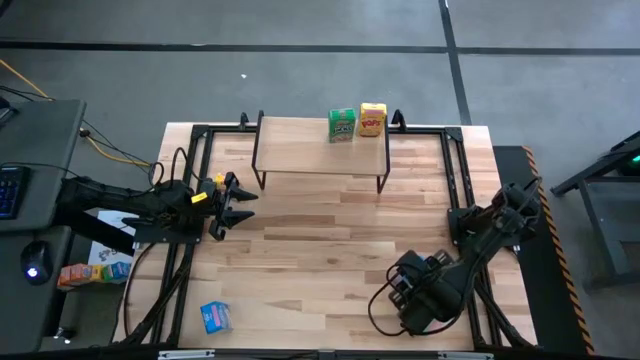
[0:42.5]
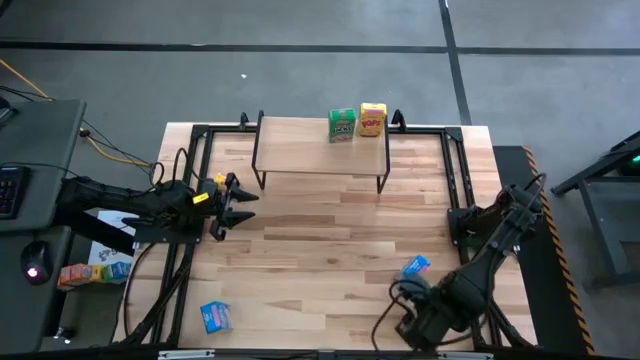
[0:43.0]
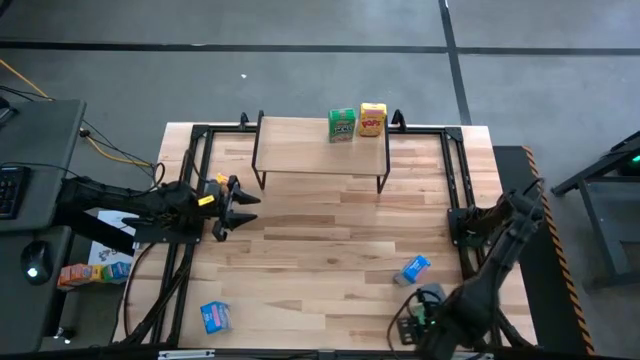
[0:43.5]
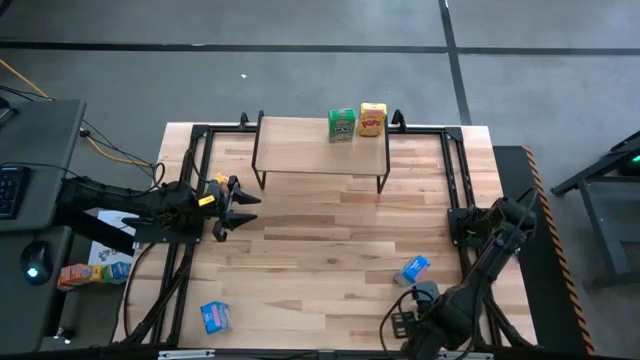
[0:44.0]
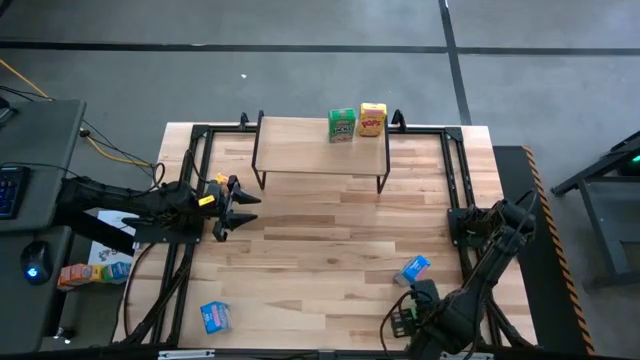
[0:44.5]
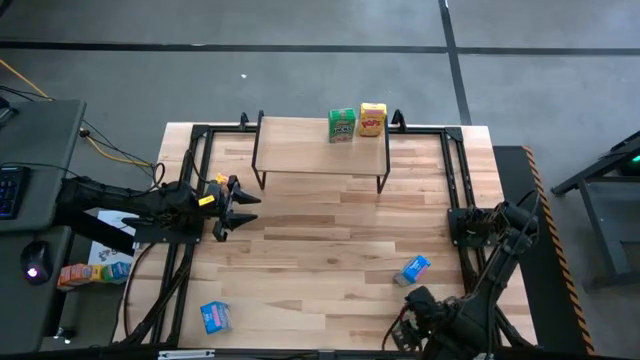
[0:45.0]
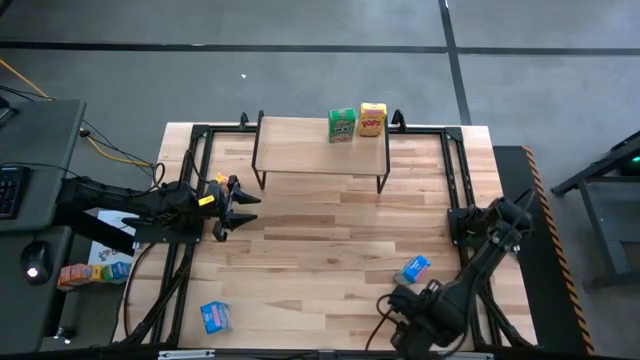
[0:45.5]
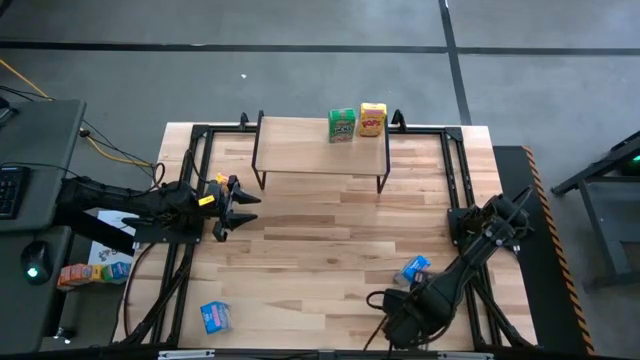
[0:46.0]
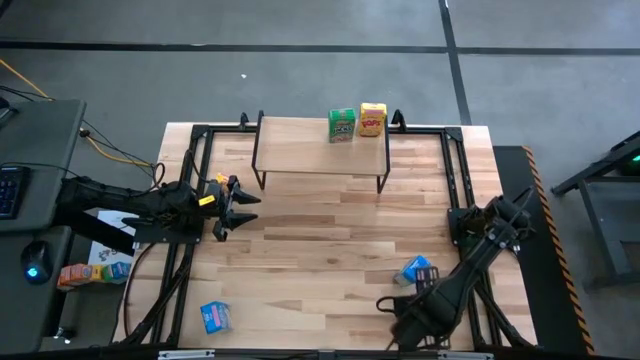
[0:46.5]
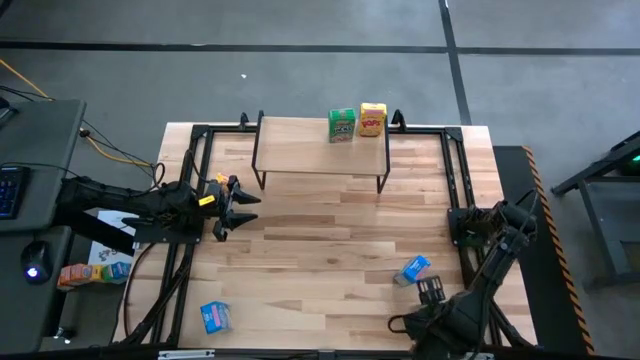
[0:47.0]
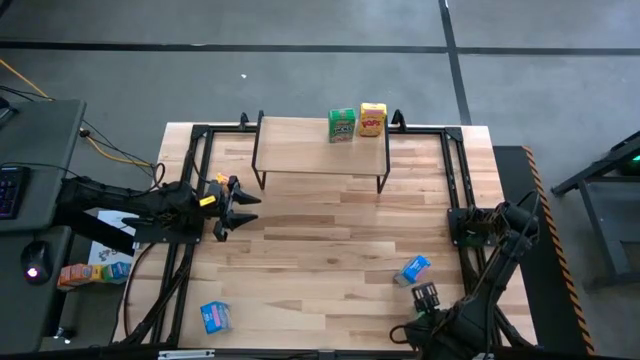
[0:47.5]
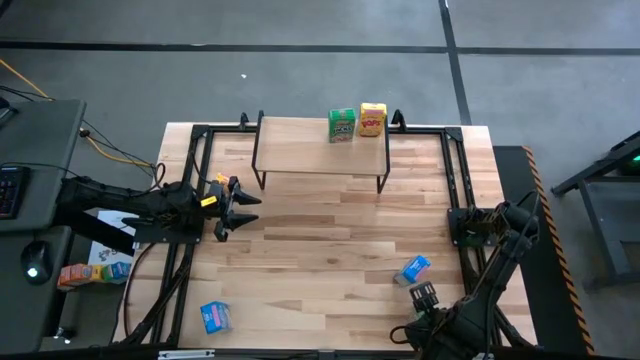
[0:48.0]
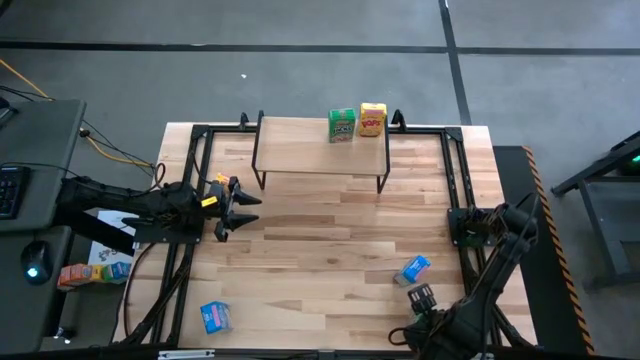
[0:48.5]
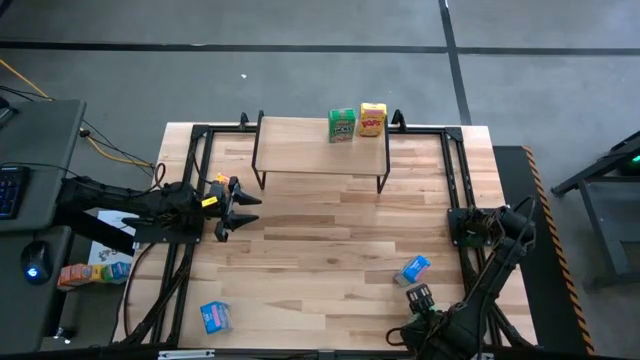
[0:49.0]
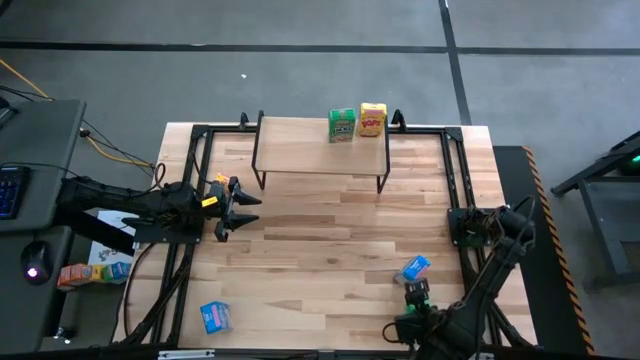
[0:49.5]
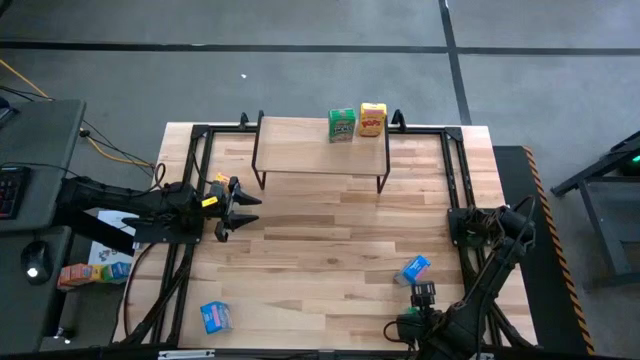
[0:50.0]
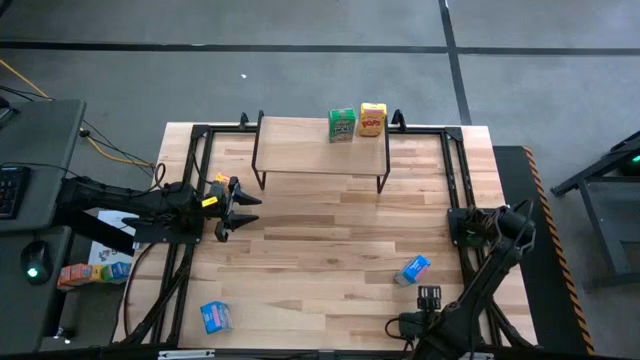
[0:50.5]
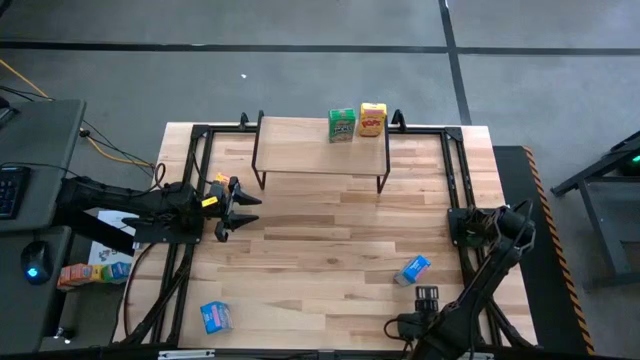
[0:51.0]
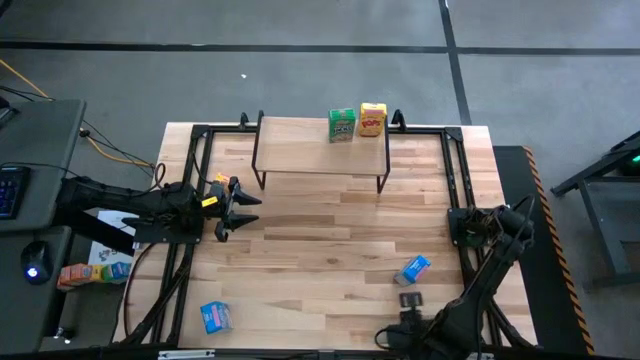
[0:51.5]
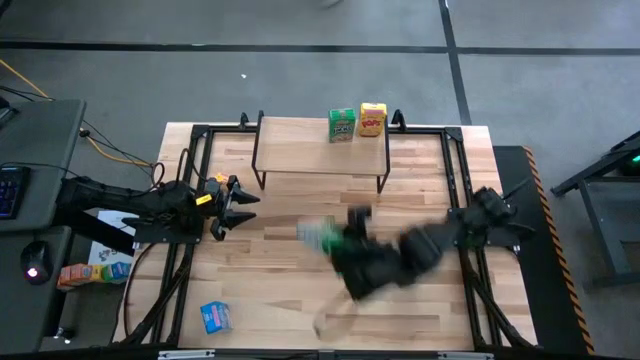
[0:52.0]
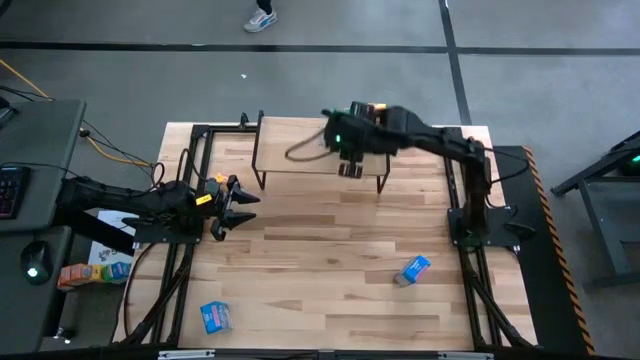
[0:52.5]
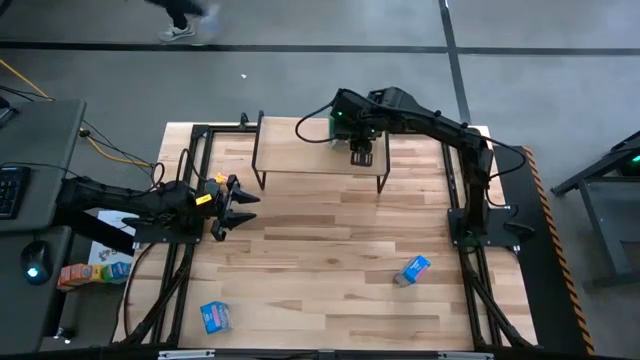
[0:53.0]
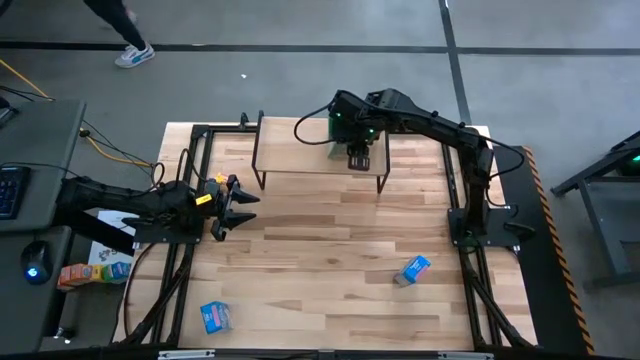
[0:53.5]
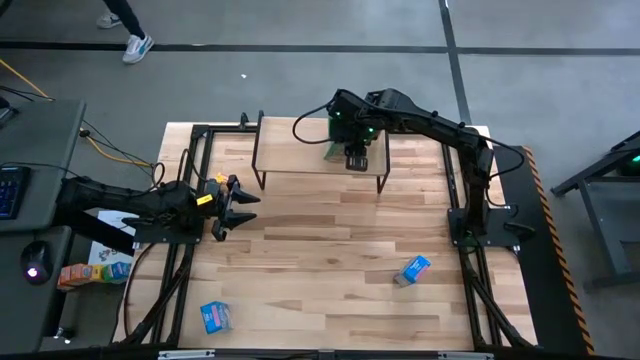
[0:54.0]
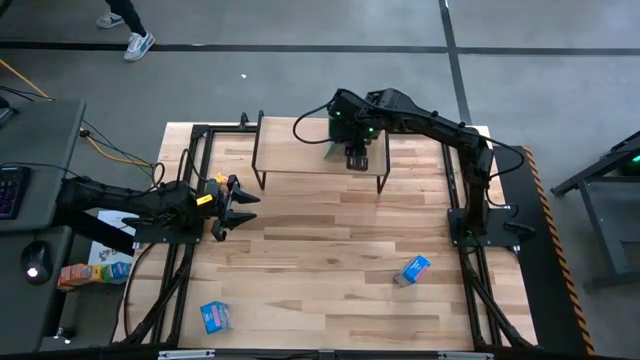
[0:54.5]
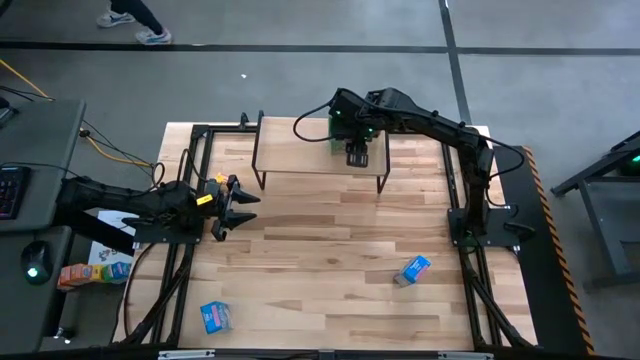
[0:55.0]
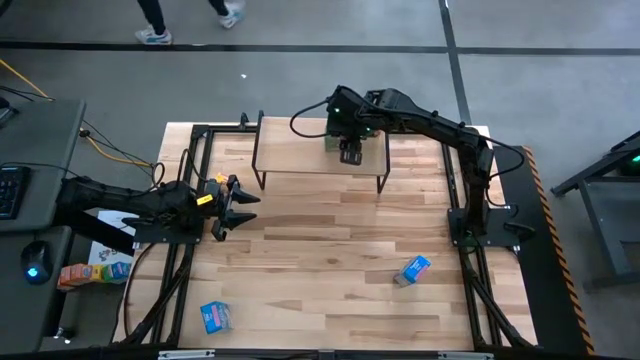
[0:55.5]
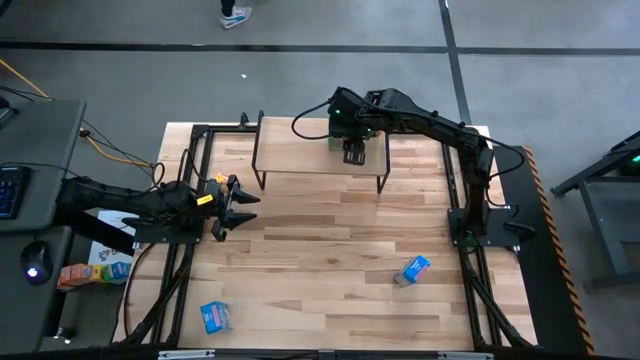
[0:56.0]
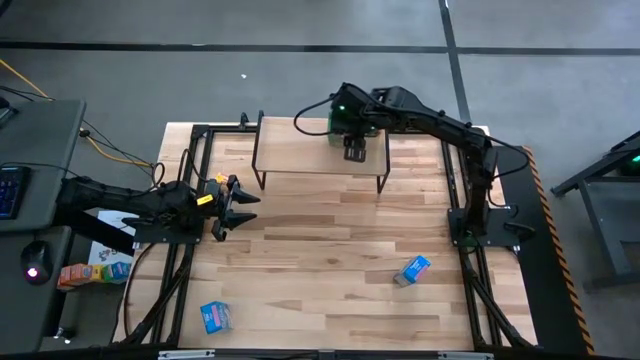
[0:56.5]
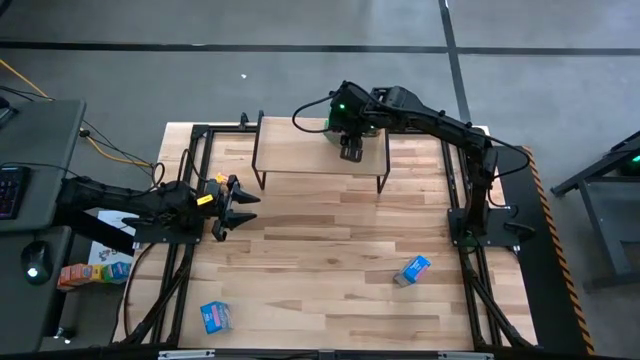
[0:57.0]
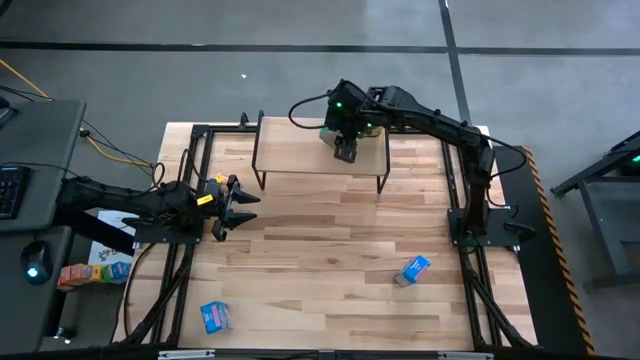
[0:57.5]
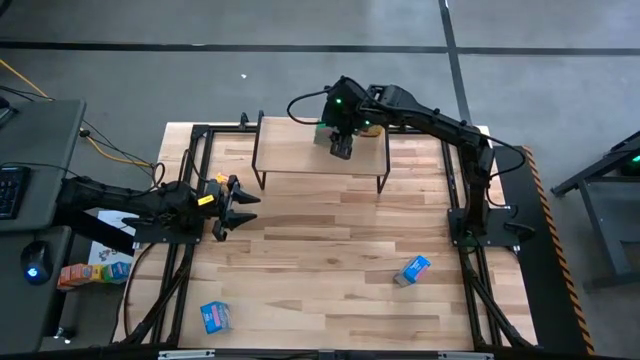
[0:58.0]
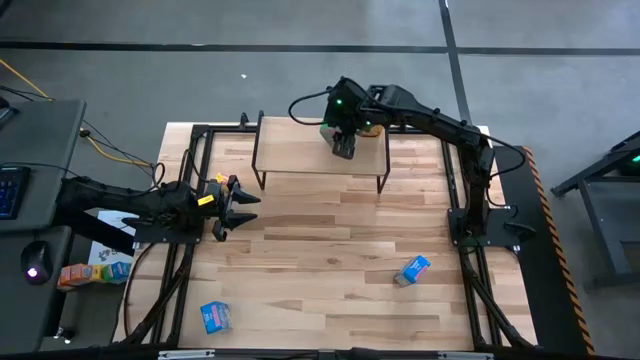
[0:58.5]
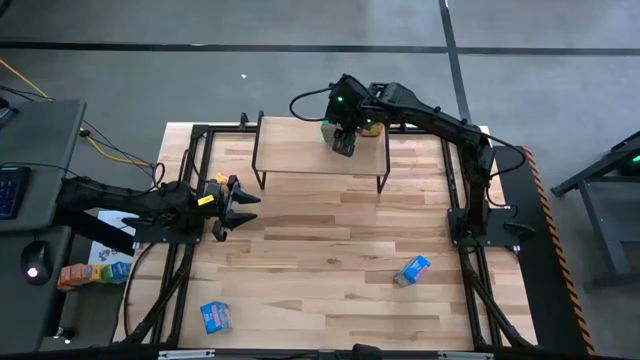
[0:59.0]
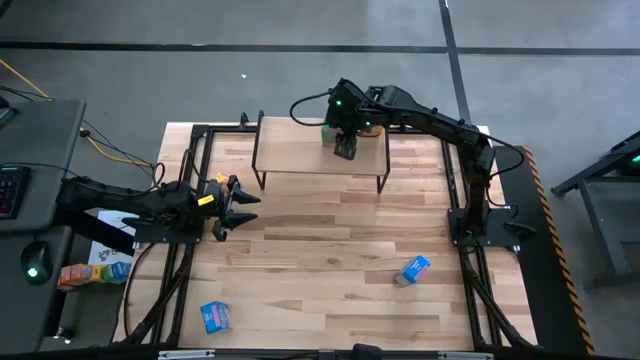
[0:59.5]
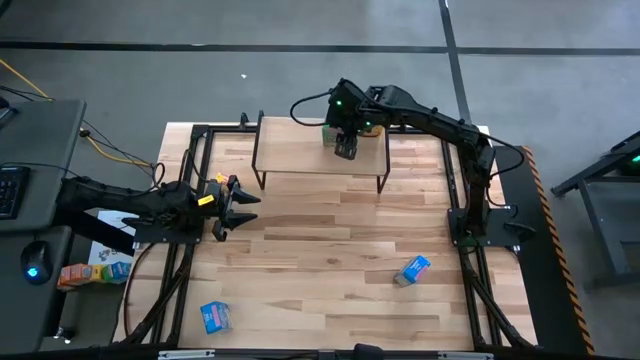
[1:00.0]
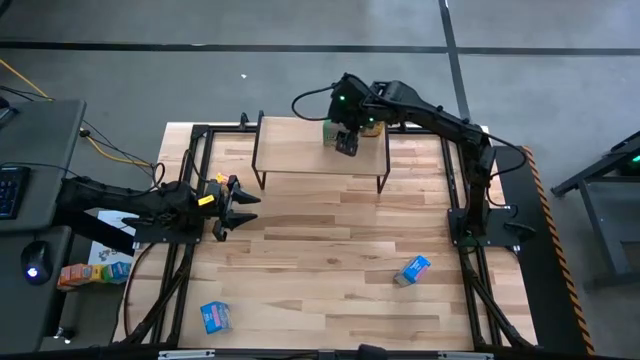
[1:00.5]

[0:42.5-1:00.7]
Task: Stack cereal on shelf
Put the green cereal box on the shelf aligned with the other green cereal box

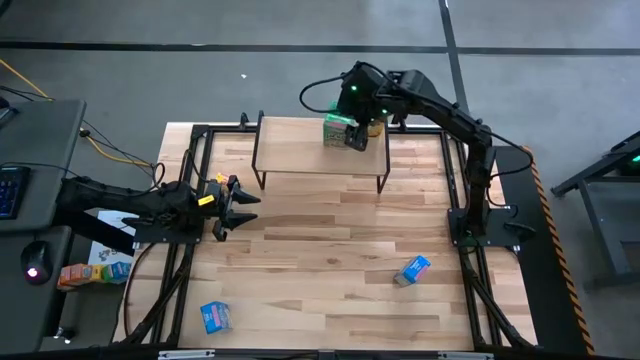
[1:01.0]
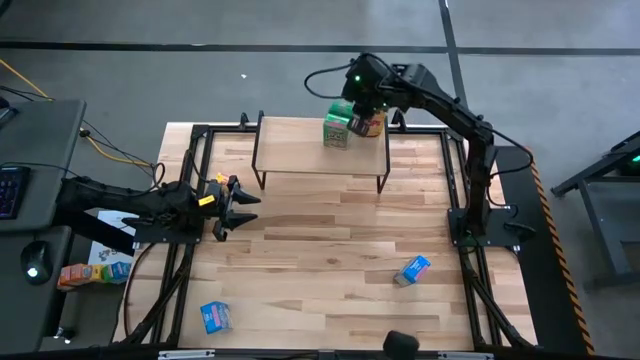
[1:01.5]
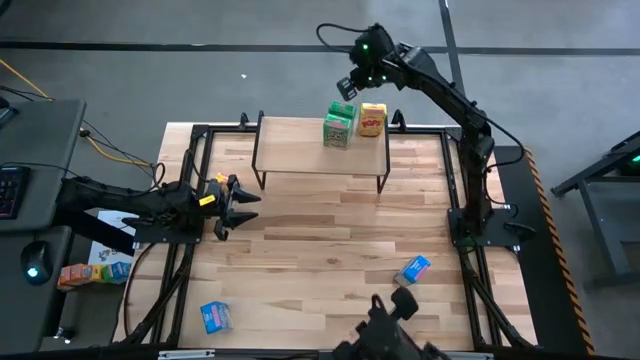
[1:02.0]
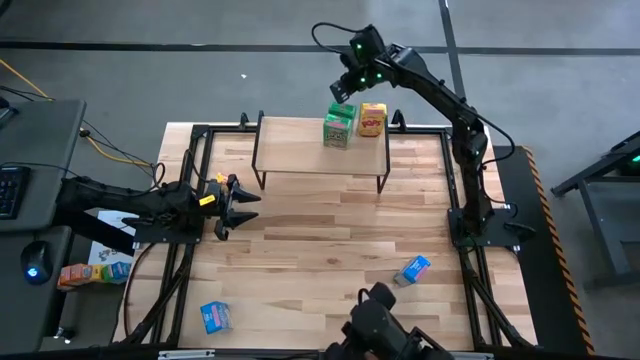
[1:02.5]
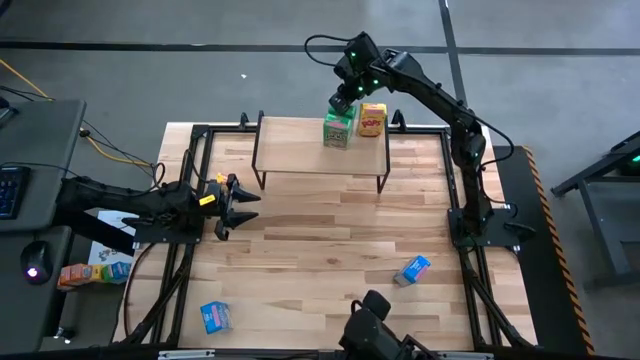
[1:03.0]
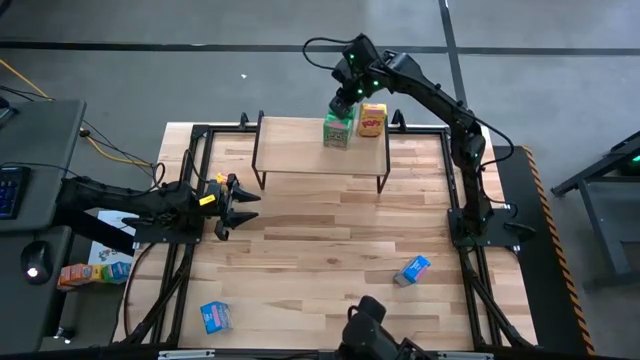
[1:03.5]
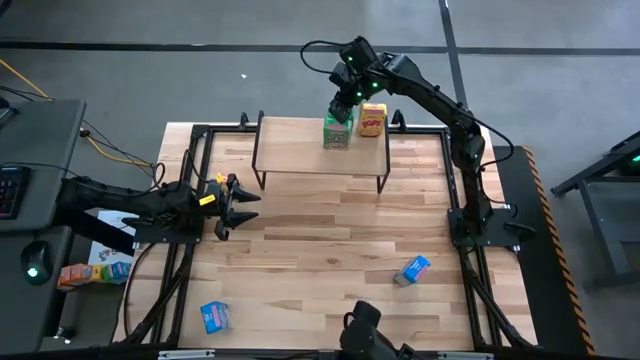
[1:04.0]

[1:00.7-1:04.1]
Adjust the green cereal box on the shelf
